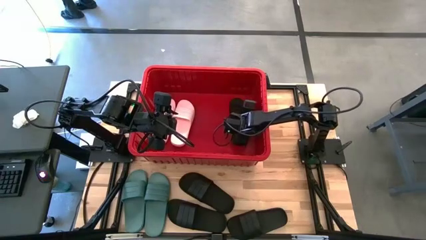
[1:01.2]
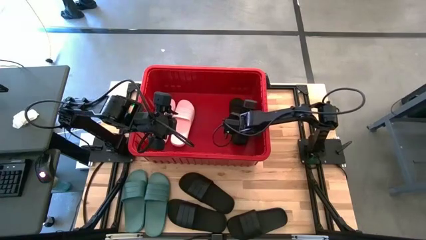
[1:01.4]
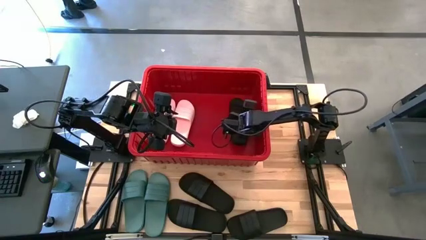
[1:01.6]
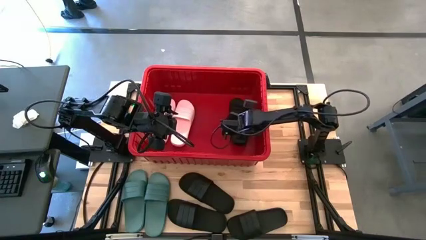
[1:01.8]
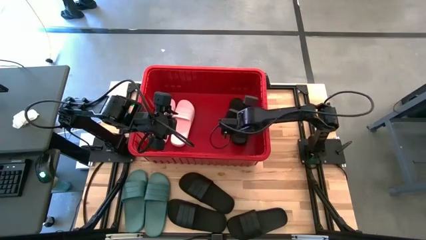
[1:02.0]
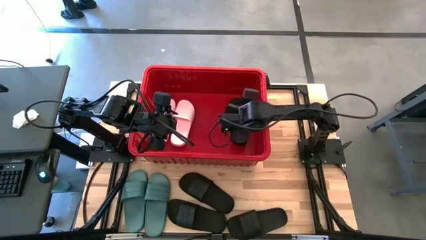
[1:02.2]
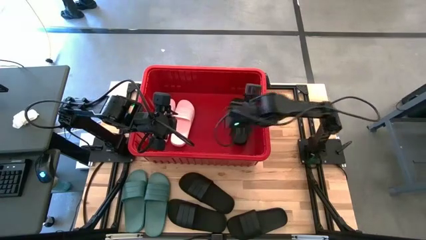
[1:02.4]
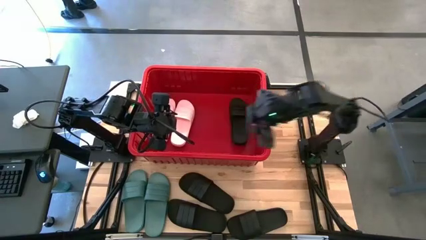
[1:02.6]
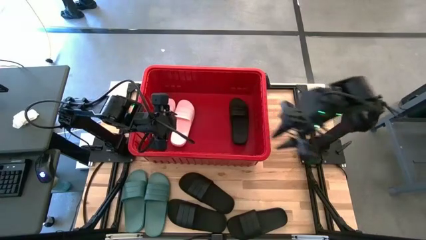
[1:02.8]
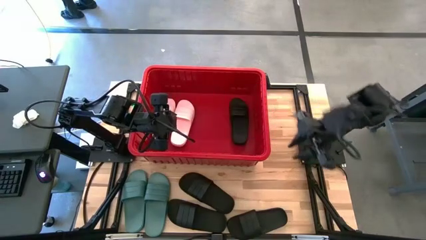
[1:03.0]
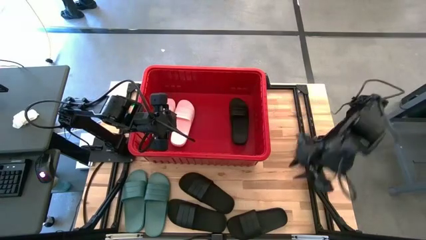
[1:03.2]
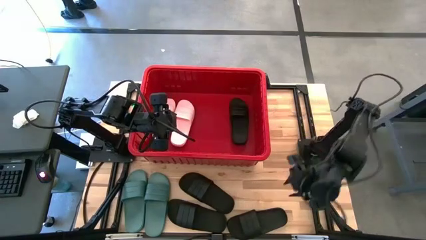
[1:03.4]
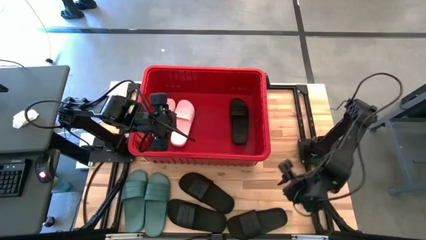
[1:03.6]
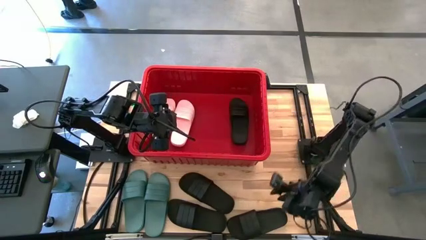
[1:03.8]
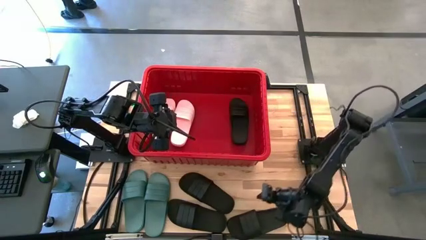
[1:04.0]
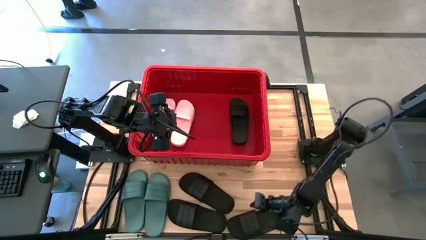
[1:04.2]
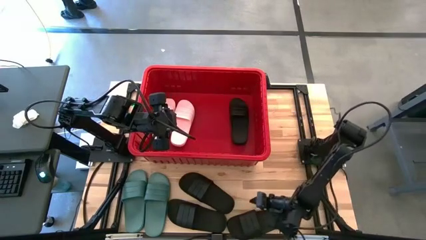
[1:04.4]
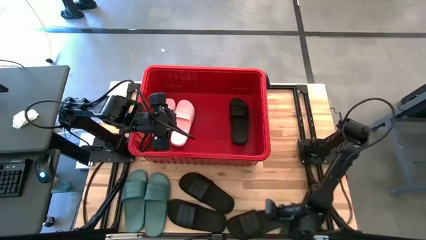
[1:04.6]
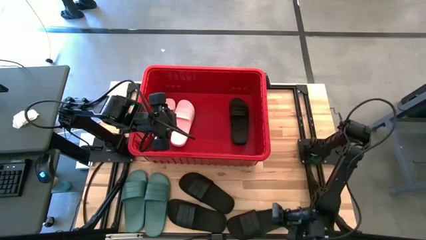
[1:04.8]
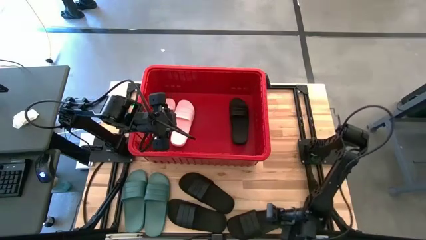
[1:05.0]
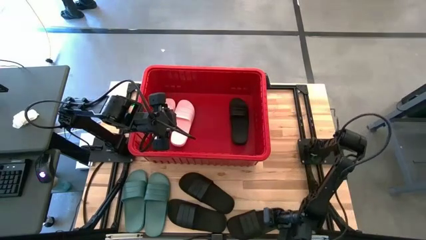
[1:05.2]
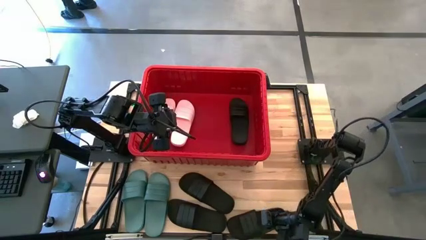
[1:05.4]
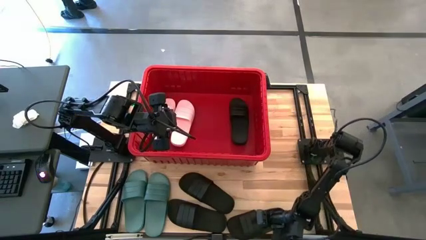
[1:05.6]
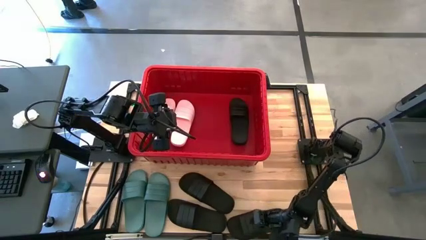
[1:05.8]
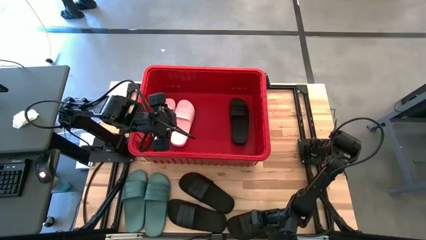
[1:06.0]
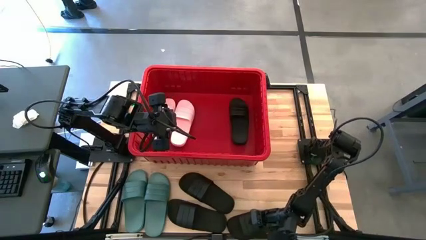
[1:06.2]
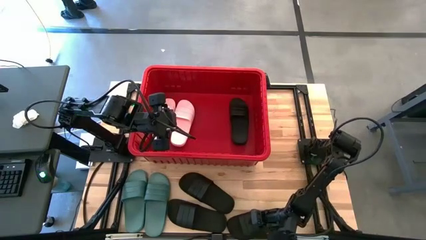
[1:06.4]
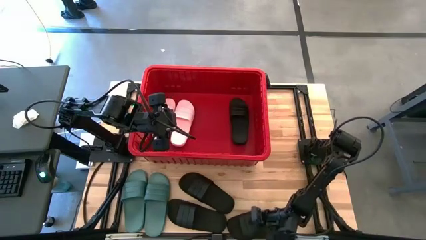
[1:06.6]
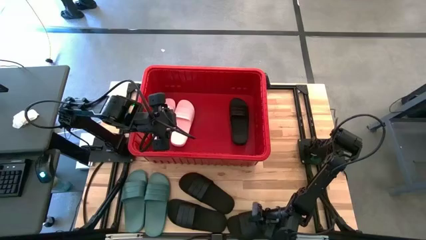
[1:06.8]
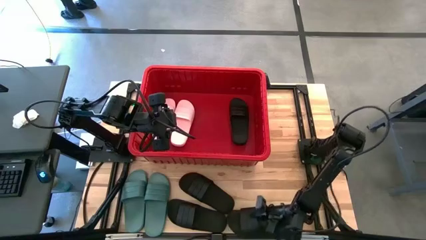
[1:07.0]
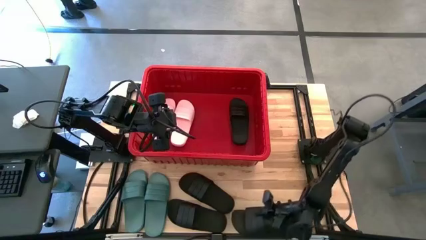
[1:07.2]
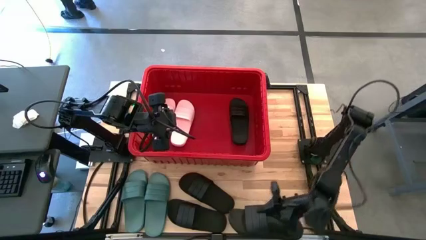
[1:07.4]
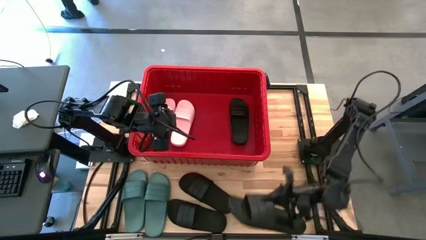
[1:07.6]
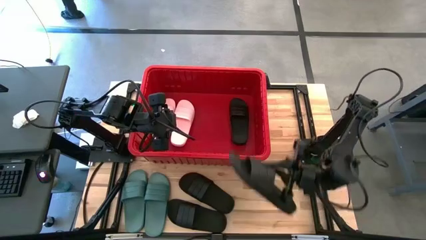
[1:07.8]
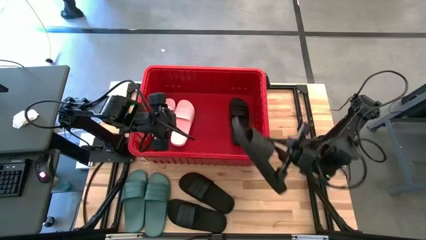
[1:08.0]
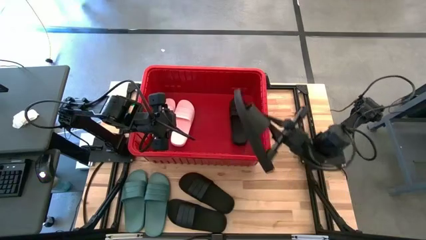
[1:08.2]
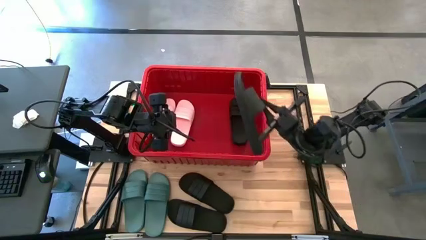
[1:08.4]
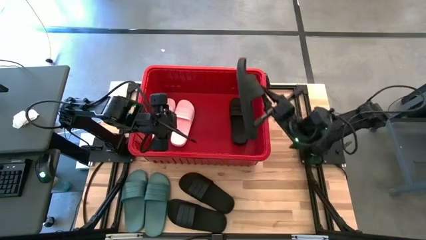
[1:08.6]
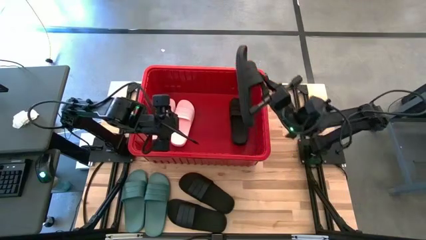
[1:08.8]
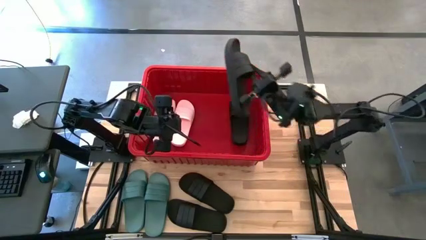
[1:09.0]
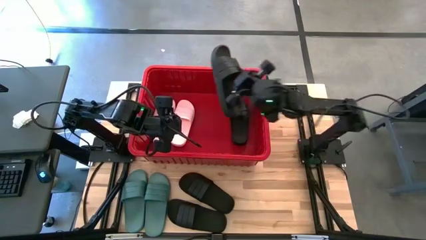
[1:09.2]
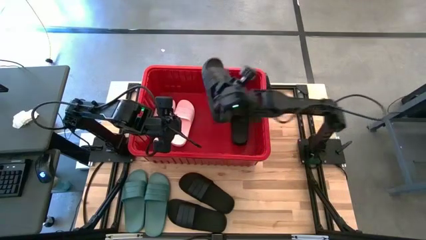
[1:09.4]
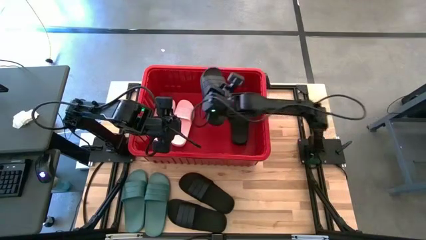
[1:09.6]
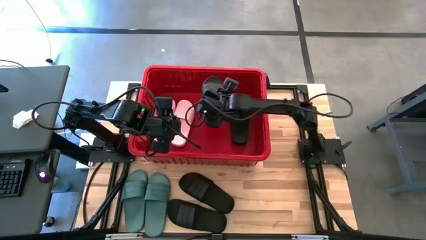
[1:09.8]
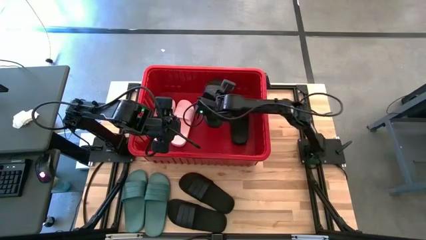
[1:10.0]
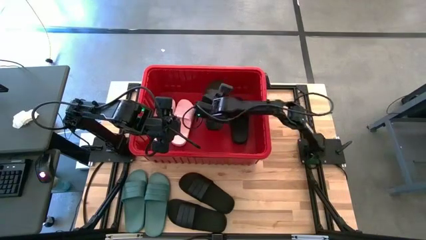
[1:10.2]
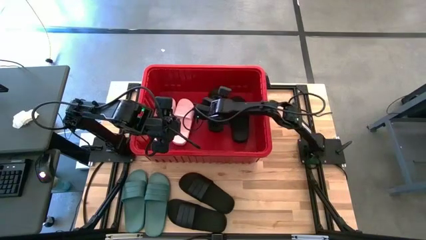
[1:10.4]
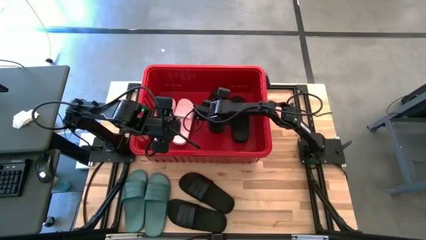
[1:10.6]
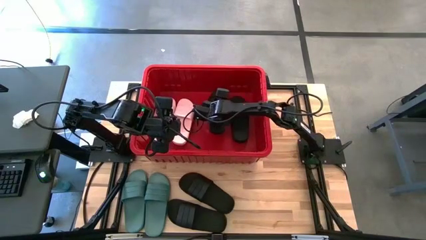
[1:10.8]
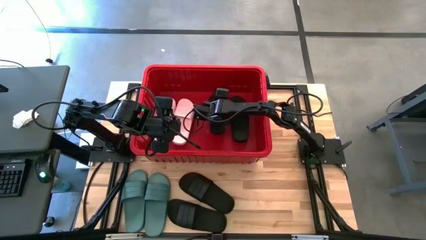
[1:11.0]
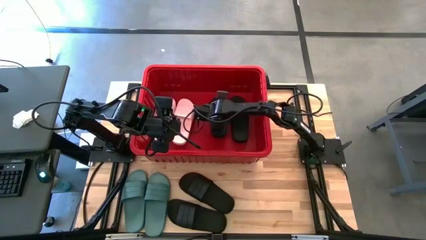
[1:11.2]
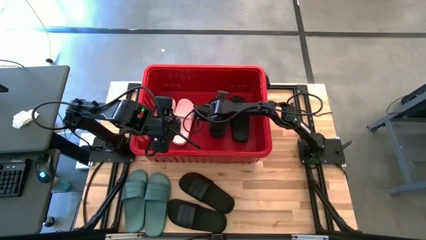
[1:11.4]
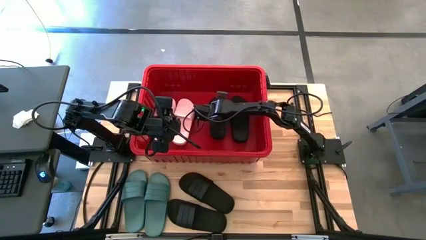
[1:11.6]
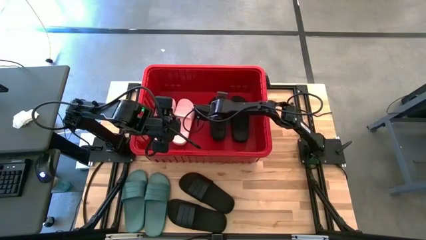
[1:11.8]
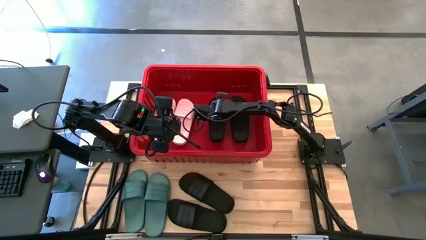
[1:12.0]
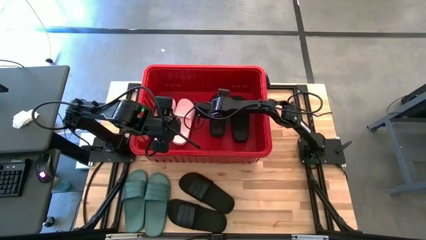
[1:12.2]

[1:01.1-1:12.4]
Task: Pick and place slides into bin
Put the black slide into the red bin

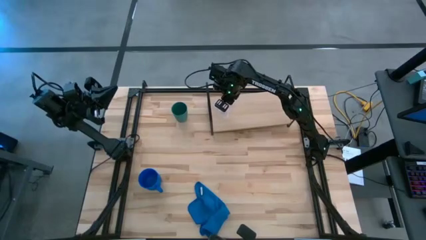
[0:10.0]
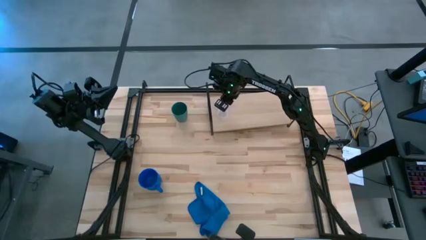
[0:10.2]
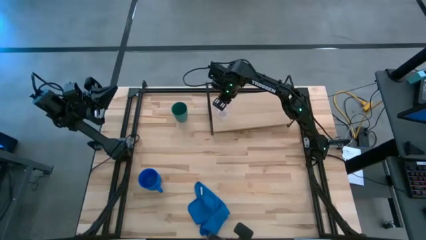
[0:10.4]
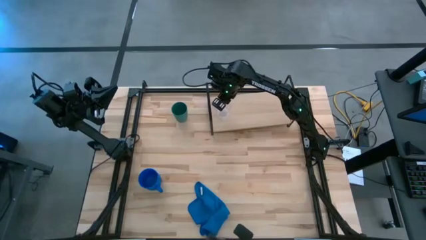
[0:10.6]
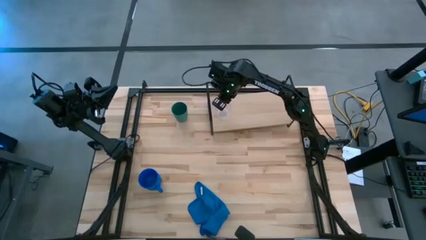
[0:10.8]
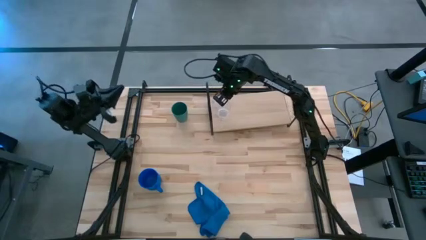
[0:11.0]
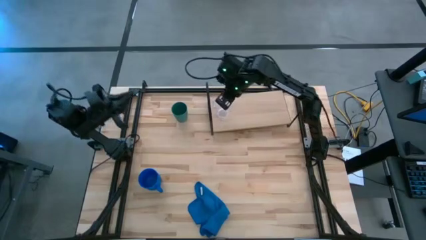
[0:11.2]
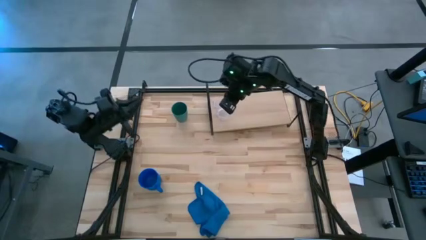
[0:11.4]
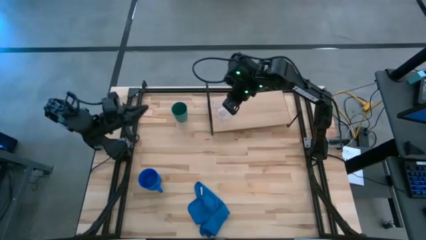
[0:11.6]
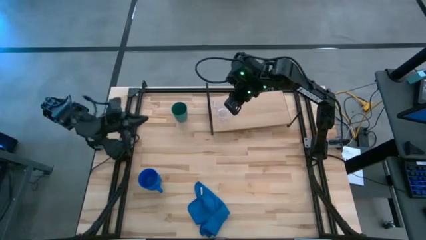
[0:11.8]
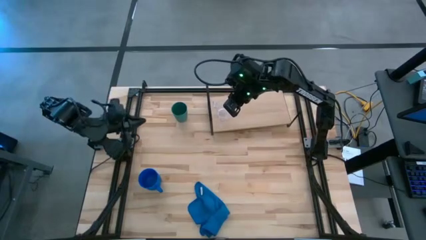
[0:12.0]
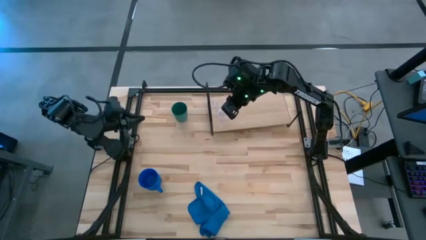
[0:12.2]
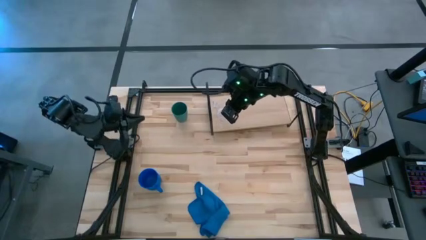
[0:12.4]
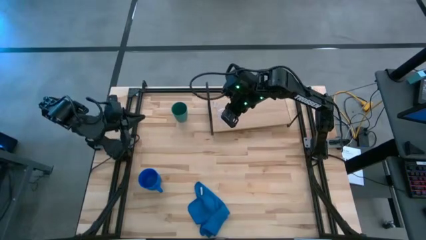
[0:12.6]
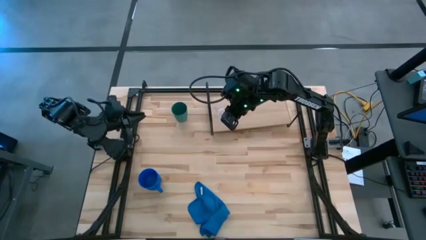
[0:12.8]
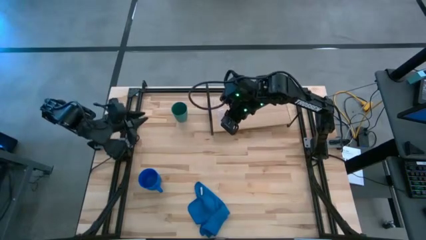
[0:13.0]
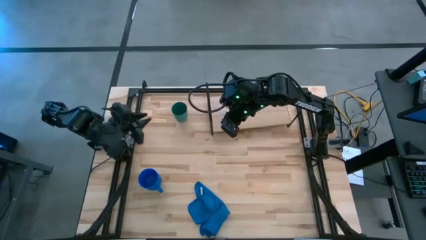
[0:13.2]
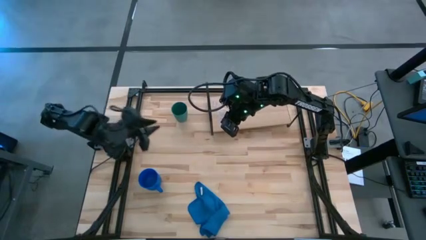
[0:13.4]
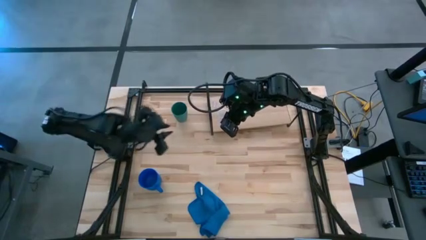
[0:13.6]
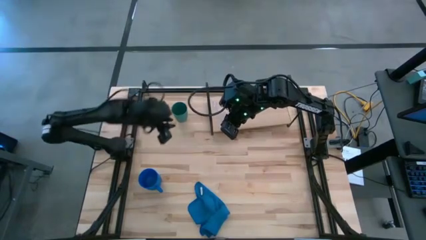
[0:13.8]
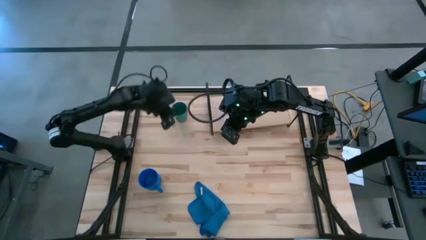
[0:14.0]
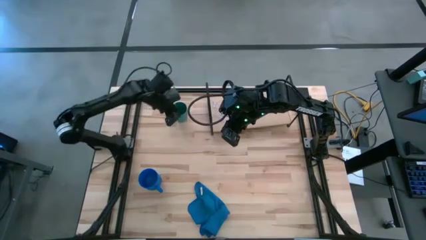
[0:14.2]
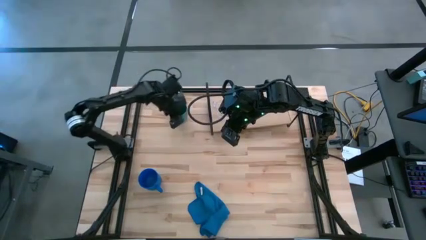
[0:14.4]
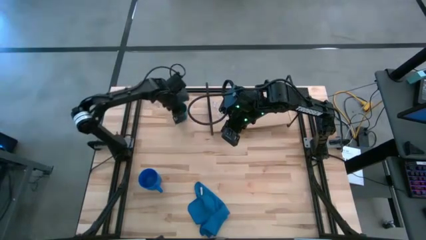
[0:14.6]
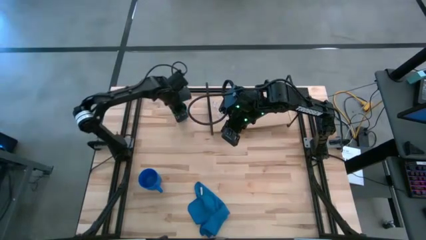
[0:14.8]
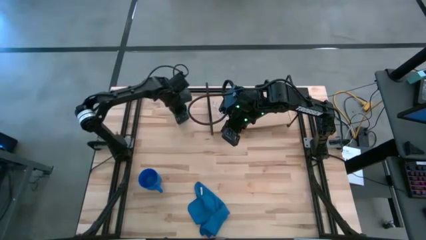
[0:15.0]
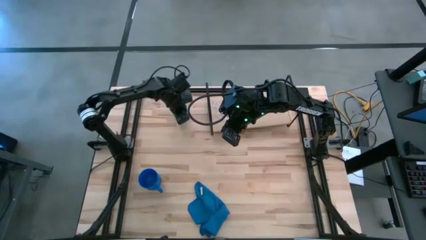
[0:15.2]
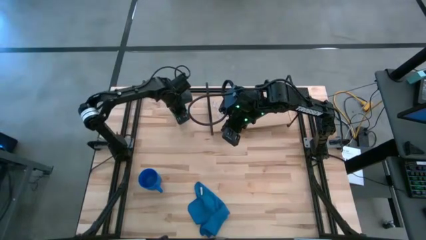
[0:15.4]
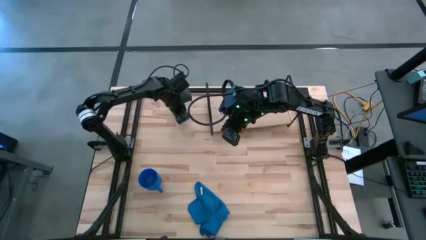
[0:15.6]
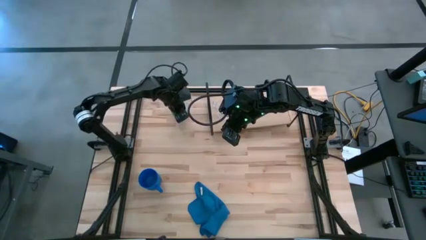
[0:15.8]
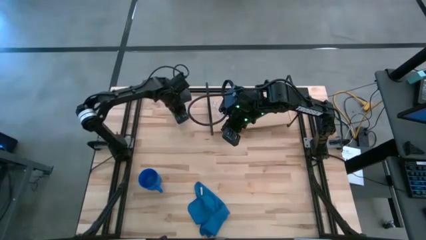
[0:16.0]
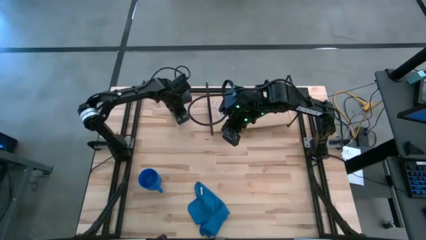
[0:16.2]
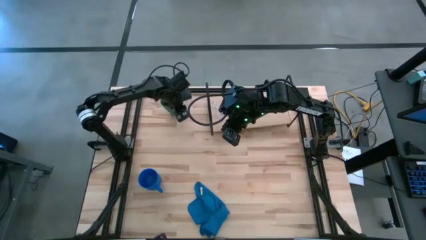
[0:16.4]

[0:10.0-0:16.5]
Task: Stack small to large cups/mugs on shelf
Adjust the green cup
